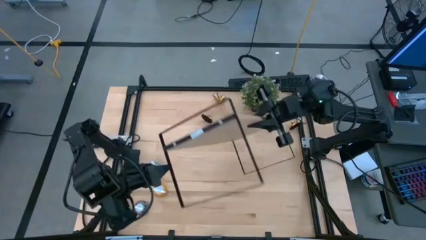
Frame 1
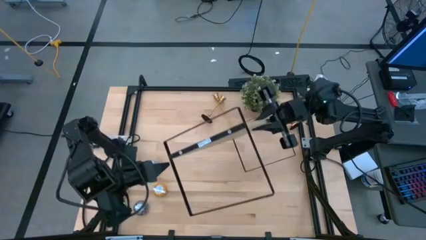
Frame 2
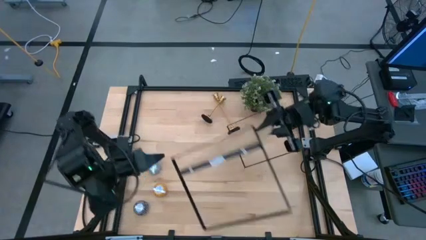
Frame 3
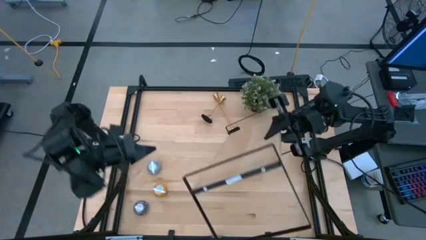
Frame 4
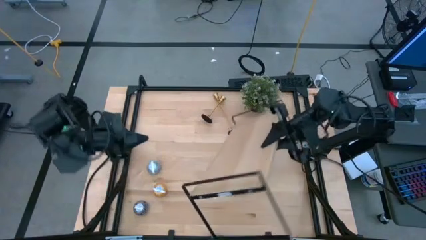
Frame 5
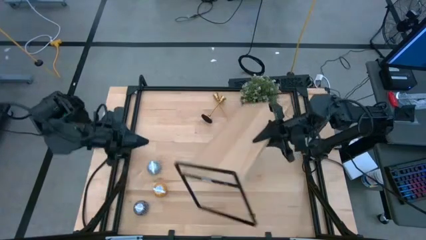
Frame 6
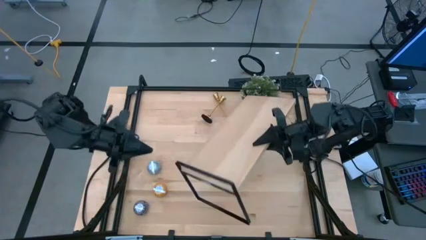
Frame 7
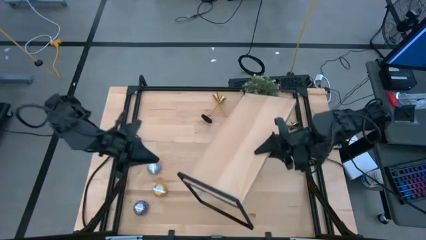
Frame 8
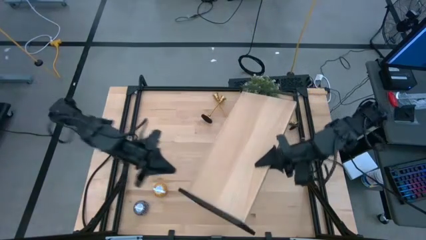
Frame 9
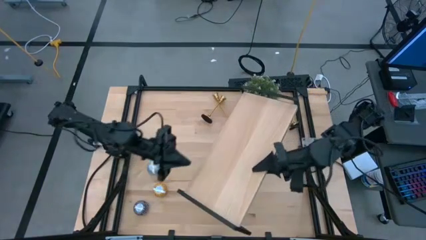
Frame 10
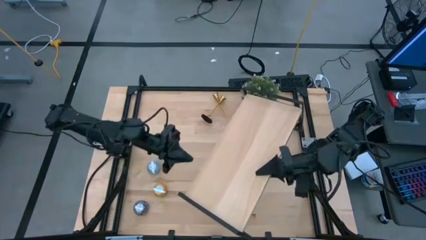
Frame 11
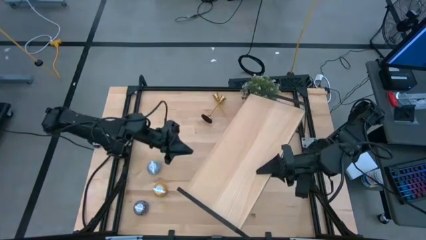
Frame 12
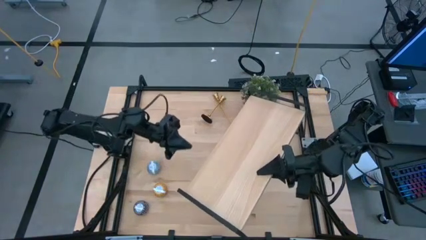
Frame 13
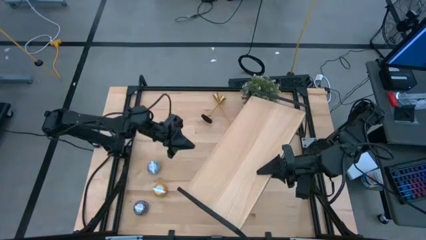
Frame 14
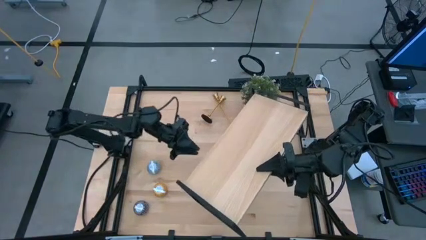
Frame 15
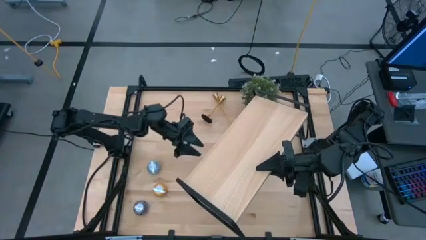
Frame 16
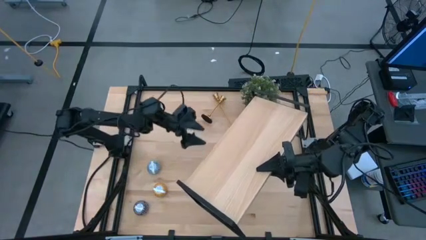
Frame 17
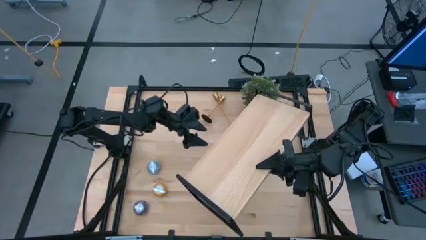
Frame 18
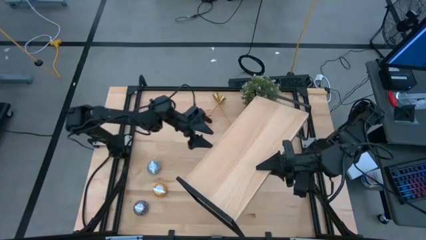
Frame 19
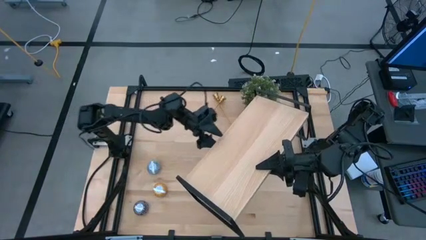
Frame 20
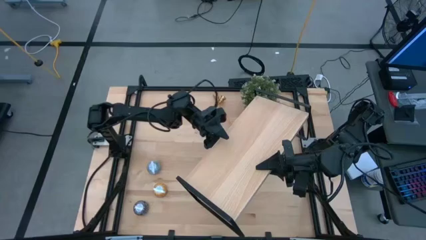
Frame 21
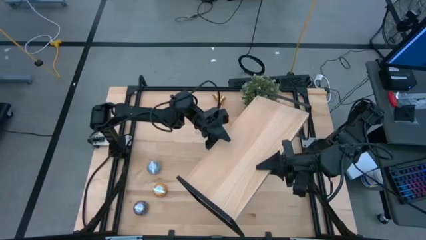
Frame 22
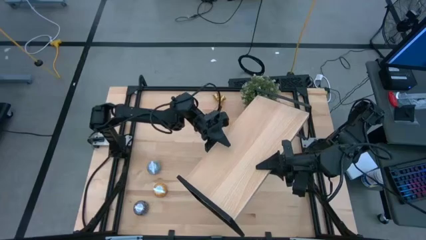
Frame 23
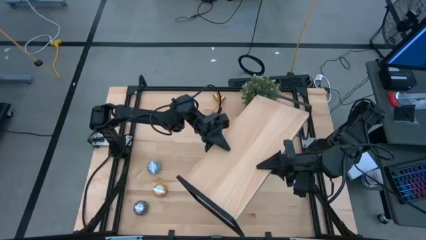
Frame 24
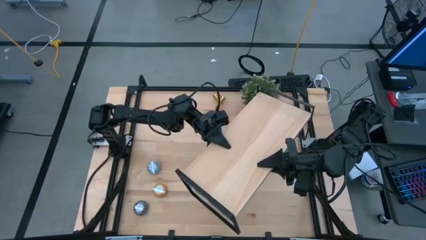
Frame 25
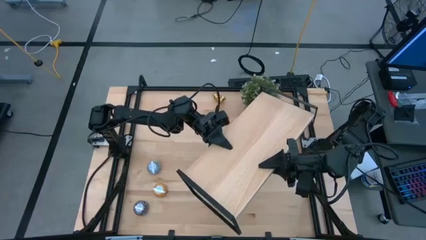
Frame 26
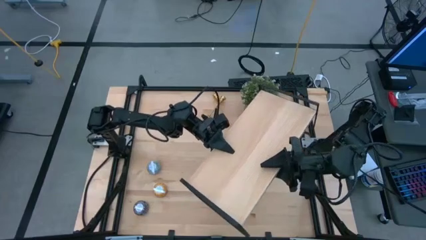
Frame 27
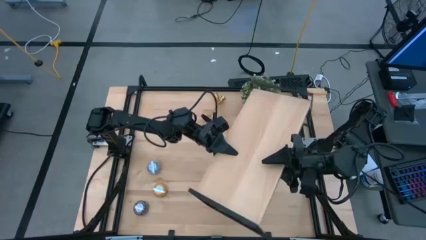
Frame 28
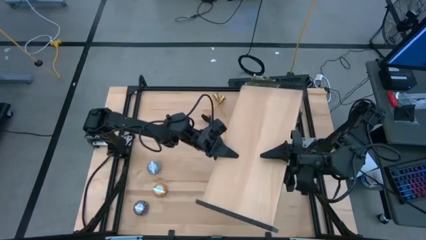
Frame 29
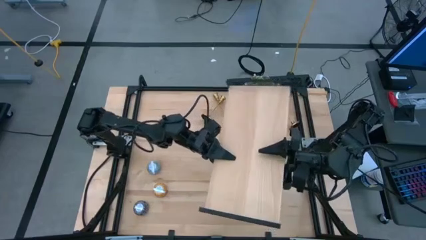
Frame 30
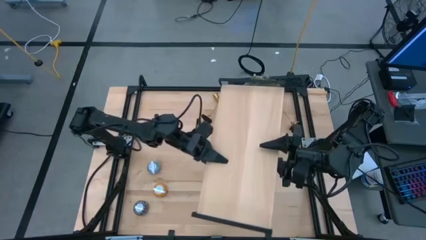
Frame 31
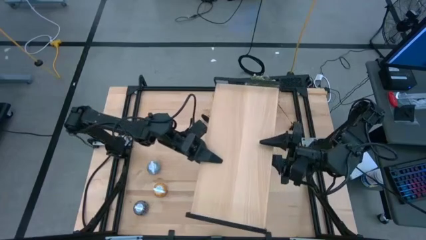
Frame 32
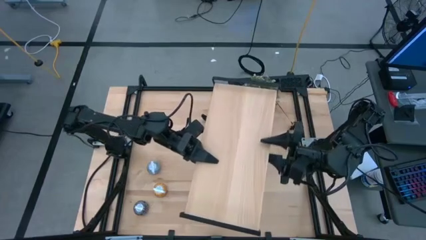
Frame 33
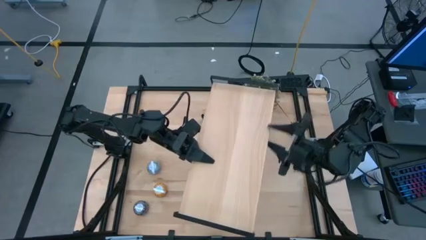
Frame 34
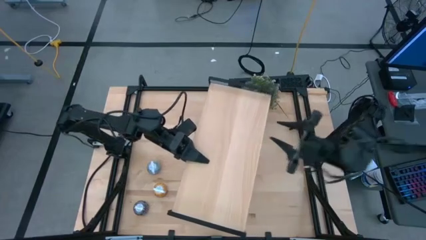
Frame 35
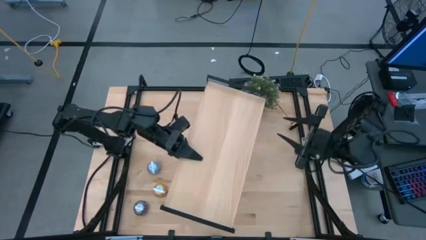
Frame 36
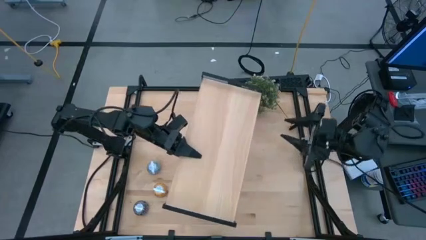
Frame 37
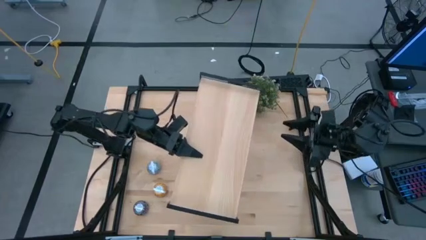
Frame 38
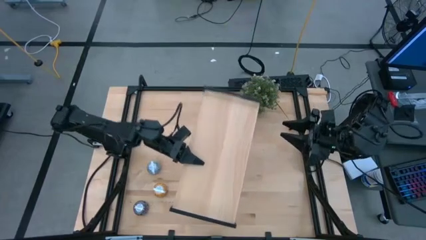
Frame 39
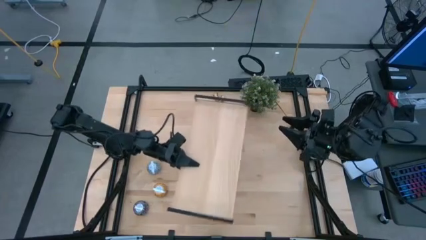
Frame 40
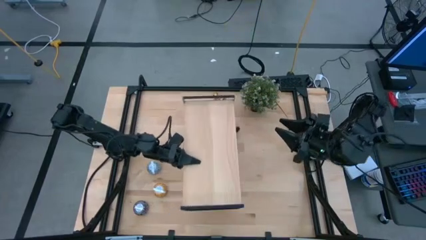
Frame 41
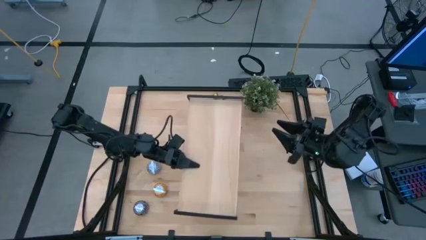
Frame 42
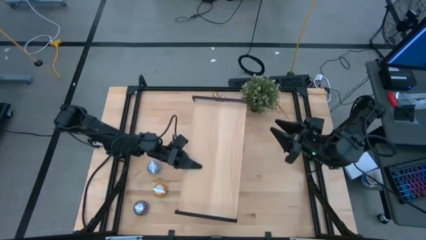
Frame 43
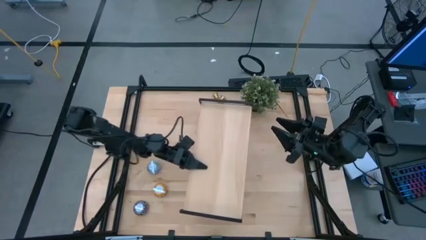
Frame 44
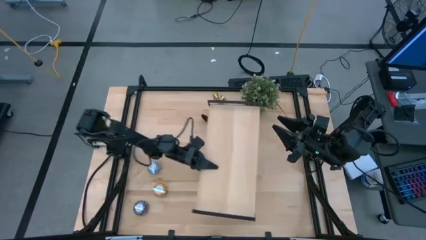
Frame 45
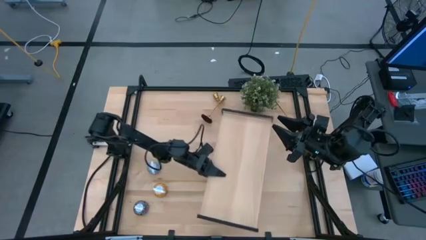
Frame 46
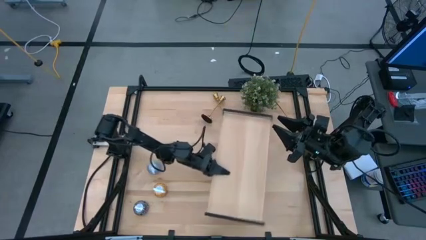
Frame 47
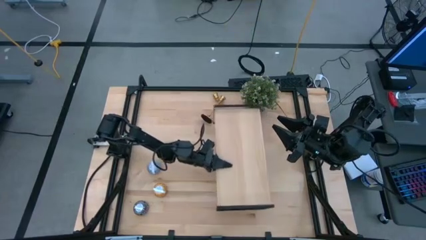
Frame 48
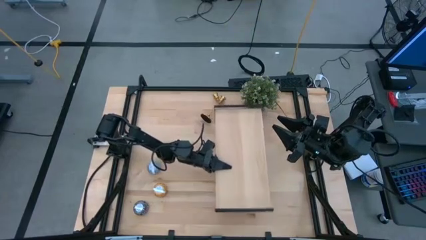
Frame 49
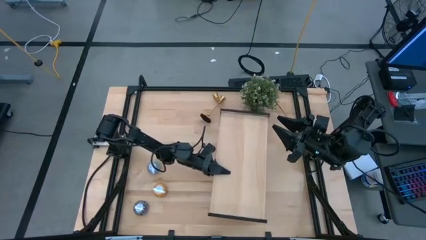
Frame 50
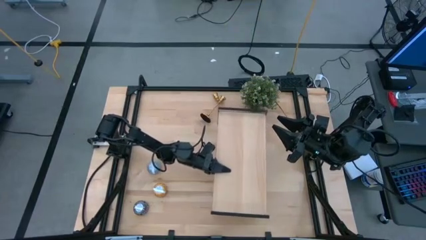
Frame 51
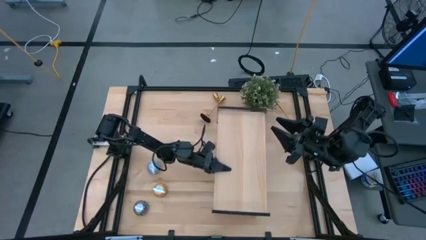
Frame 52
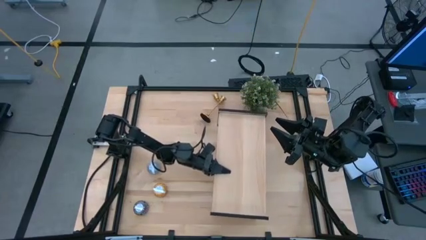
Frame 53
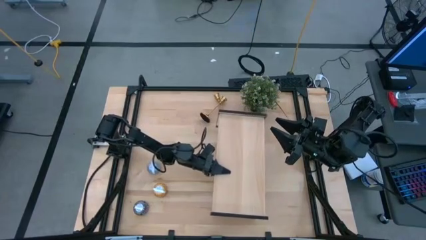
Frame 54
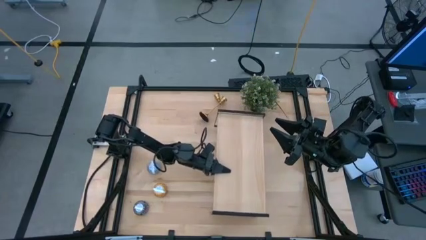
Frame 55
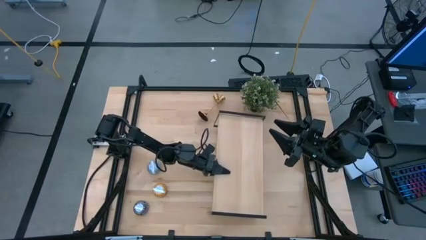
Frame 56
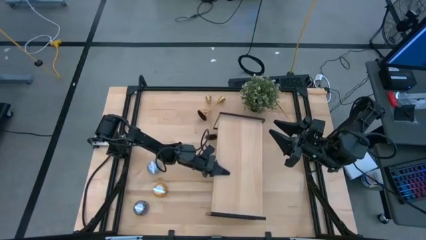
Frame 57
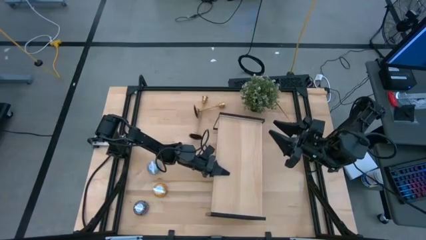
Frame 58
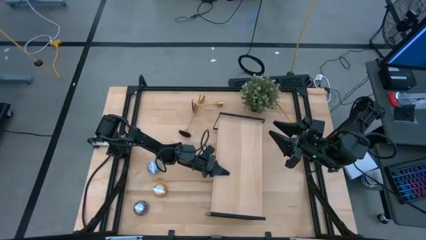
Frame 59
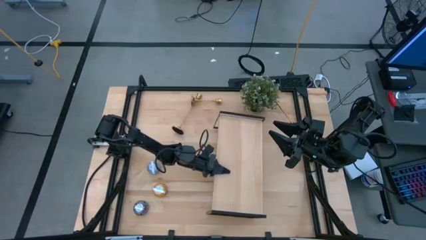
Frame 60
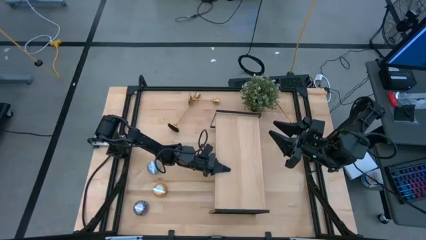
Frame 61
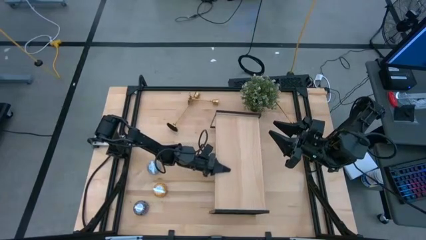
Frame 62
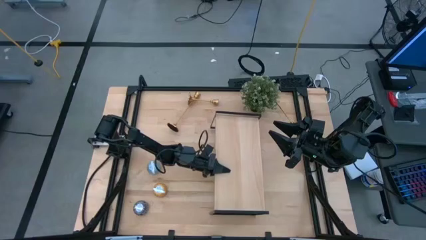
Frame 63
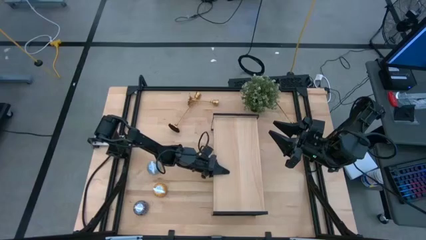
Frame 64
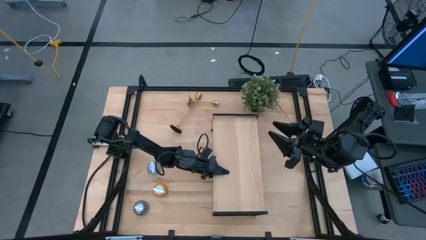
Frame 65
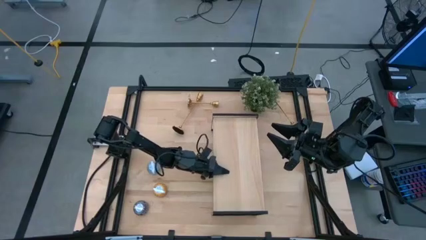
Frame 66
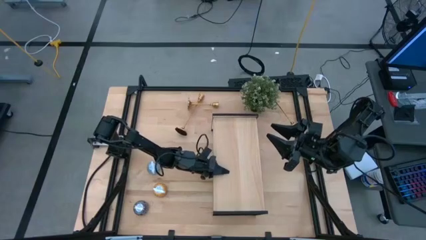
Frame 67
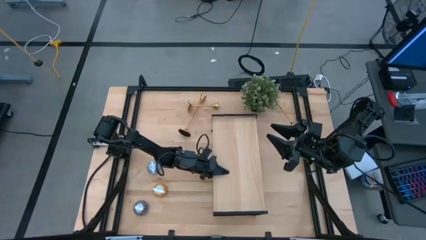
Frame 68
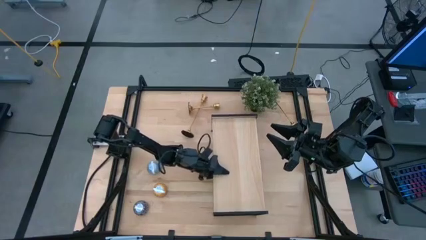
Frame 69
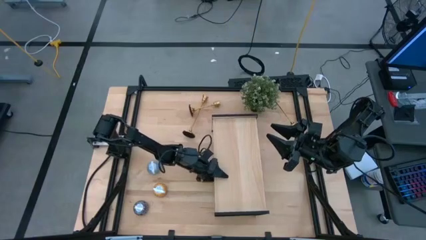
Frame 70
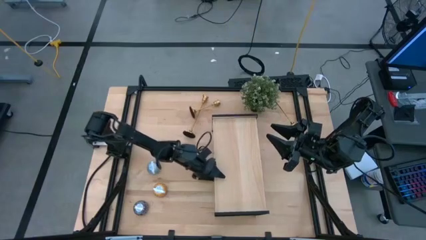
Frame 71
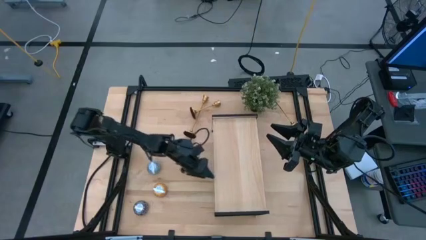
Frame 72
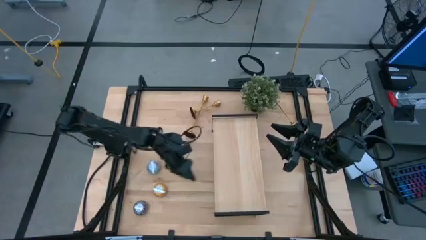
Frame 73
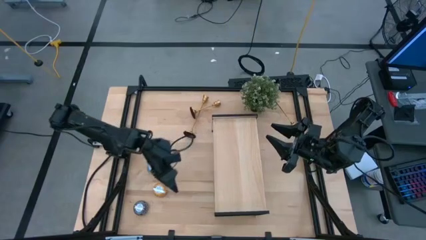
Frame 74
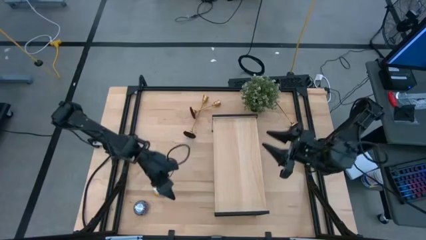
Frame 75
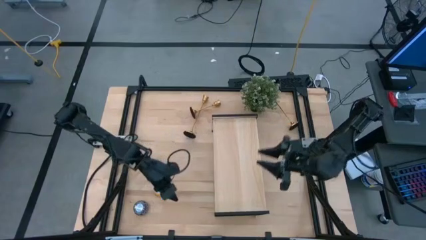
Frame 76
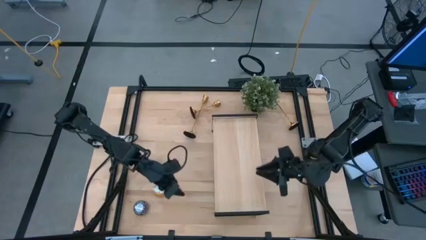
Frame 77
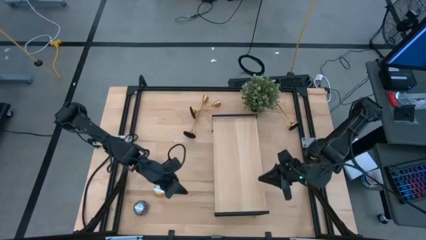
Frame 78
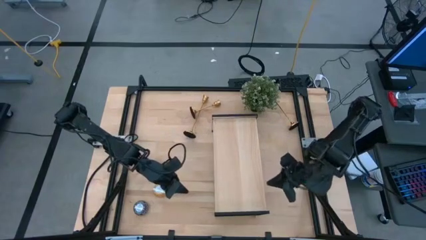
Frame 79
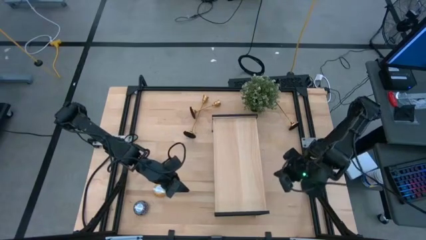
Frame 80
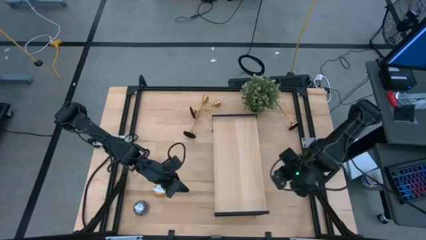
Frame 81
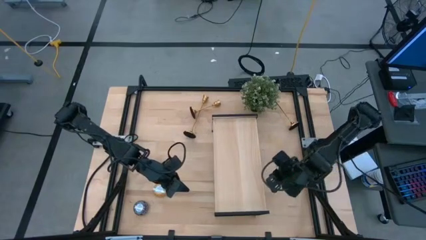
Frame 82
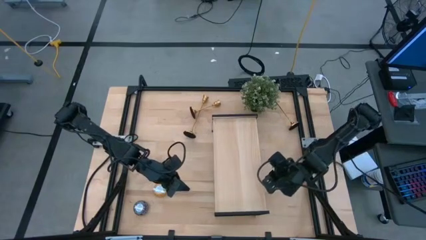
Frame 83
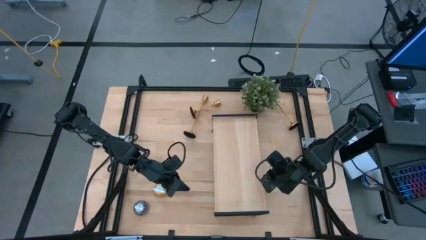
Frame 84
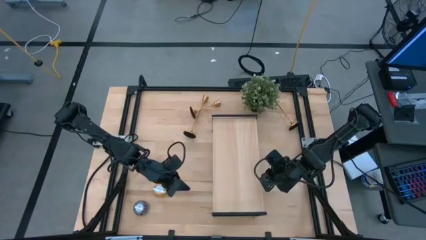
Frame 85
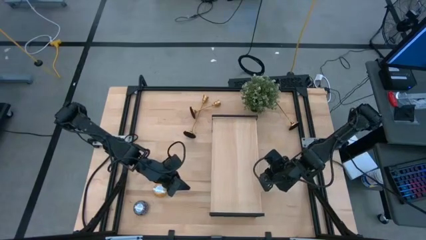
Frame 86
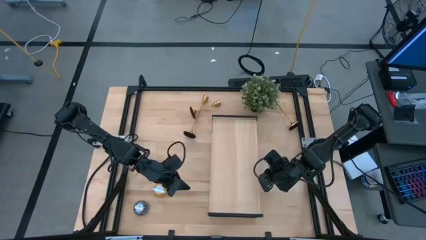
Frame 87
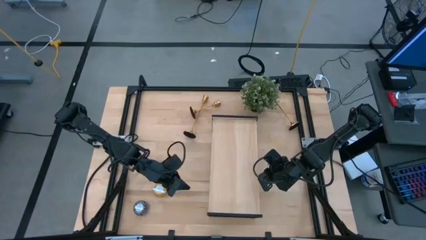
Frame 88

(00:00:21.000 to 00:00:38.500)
Task: Pick & Place candle stick holders
Prepare the shelf
